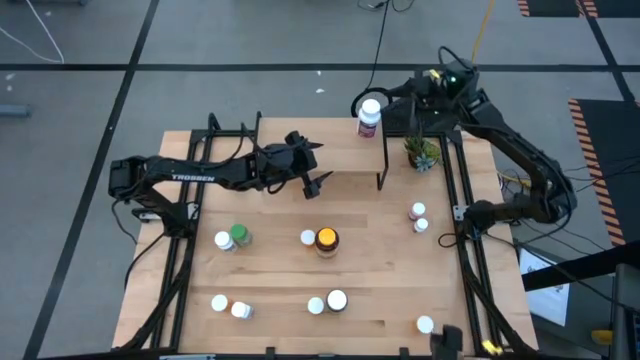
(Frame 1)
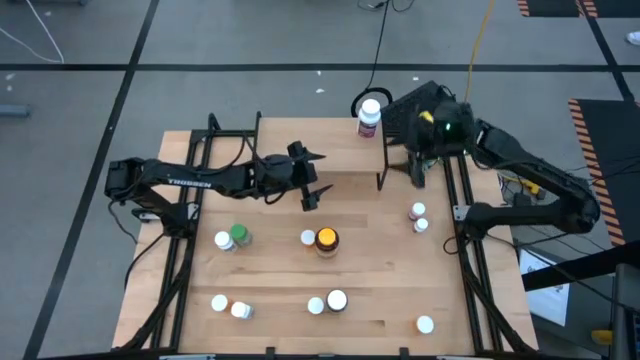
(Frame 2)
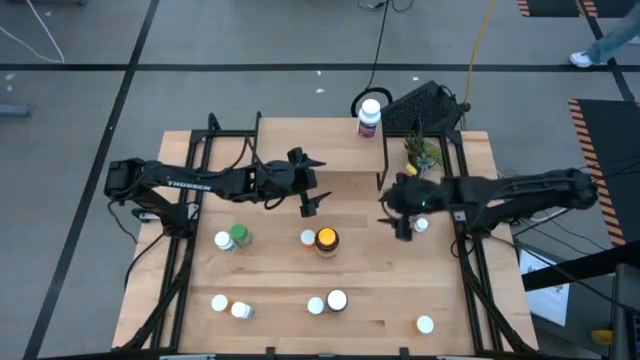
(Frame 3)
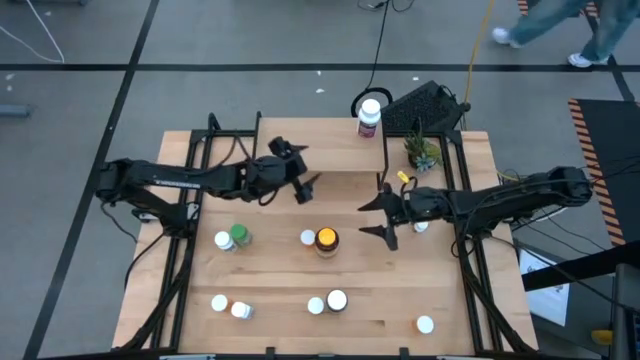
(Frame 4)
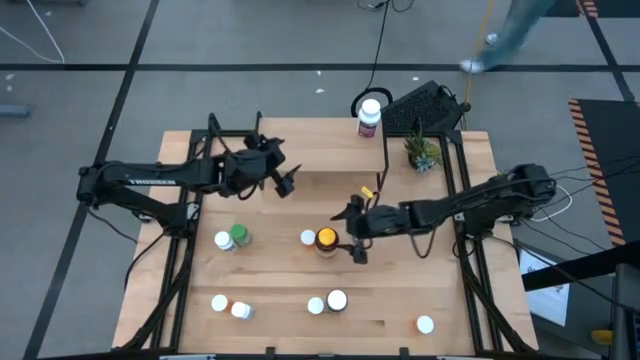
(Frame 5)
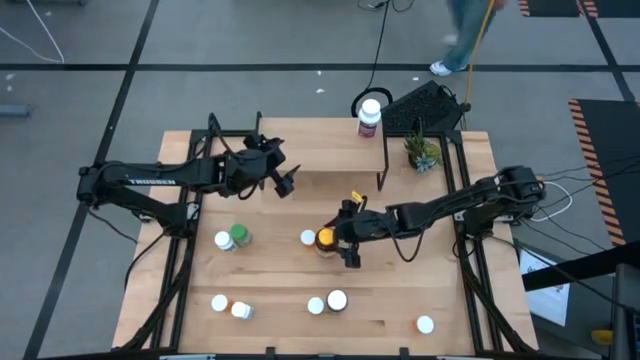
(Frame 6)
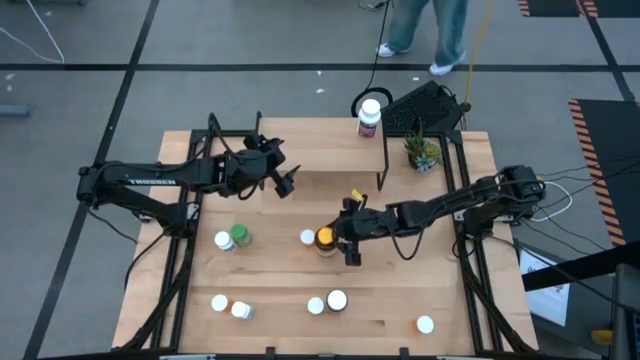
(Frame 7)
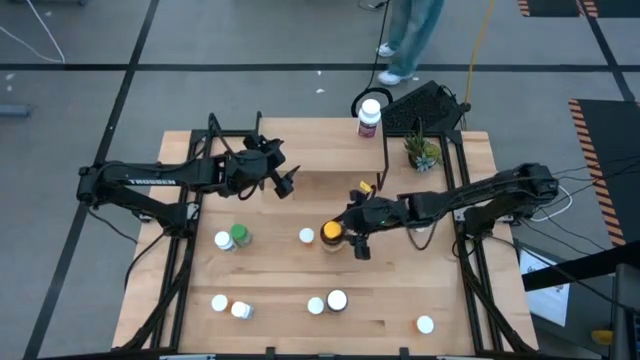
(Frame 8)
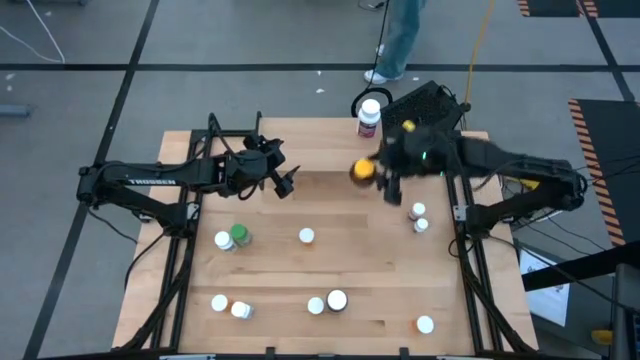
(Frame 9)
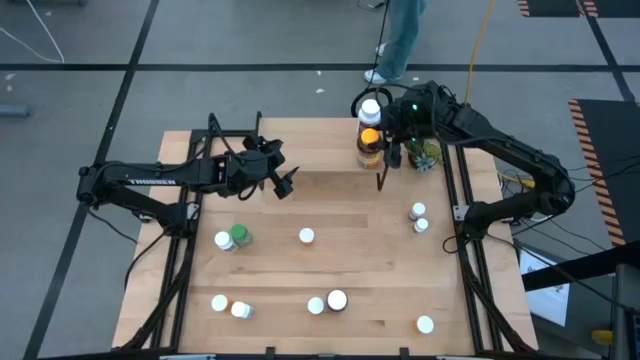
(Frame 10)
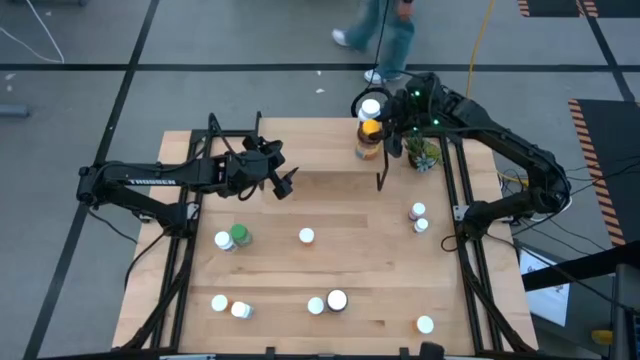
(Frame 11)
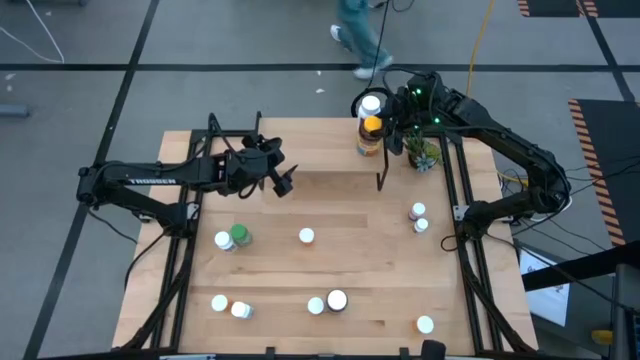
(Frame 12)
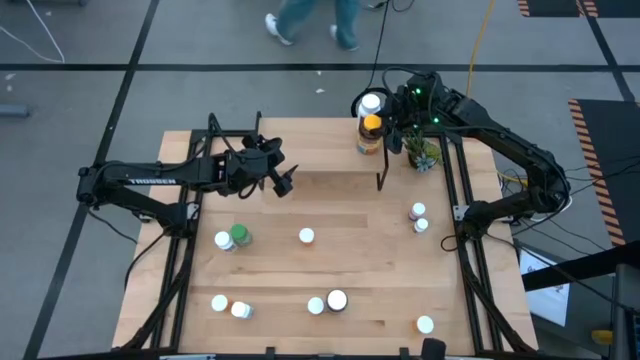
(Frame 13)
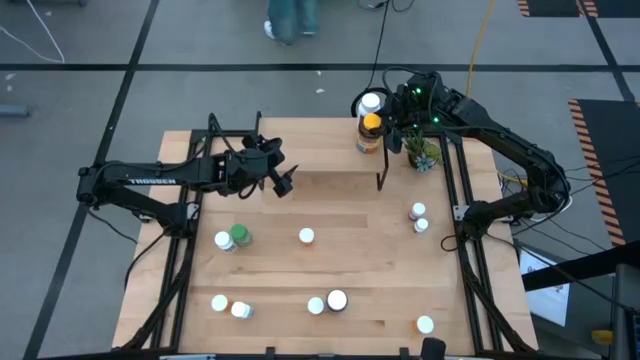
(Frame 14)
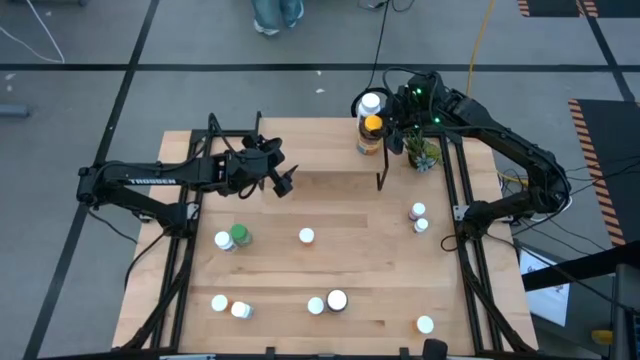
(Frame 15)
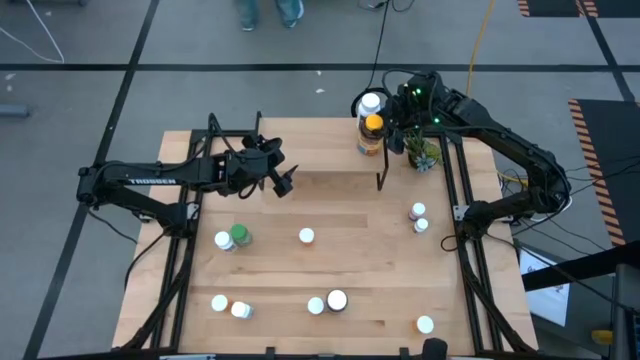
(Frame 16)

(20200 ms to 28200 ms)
Task: Pick and place medicine bottles onto shelf by color
Put the yellow pill bottle on the shelf

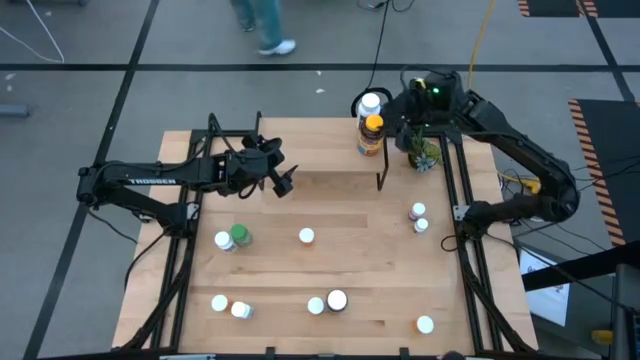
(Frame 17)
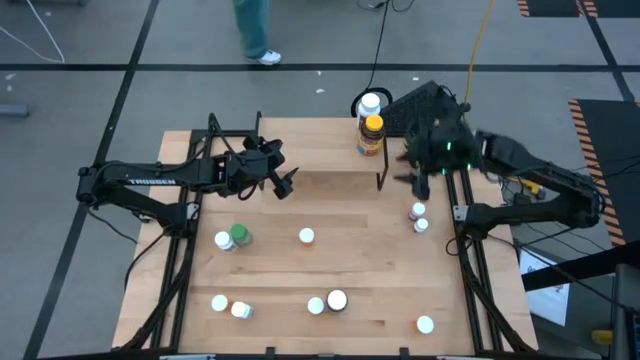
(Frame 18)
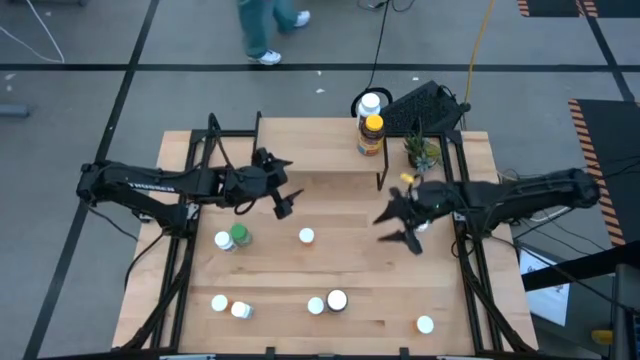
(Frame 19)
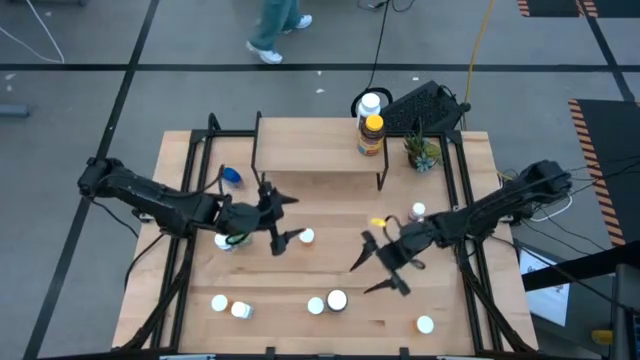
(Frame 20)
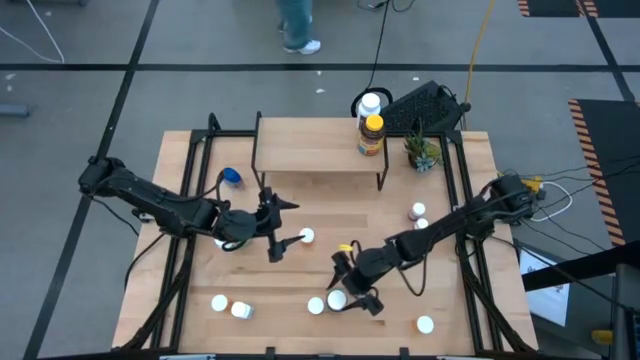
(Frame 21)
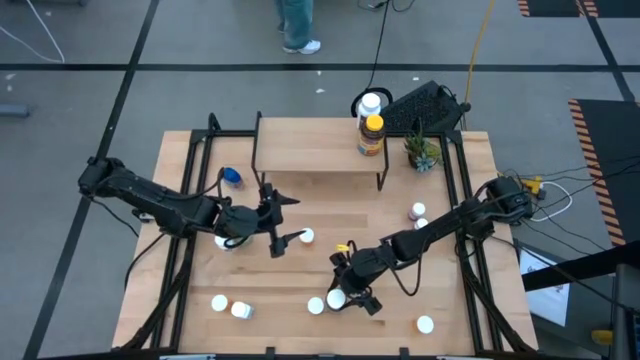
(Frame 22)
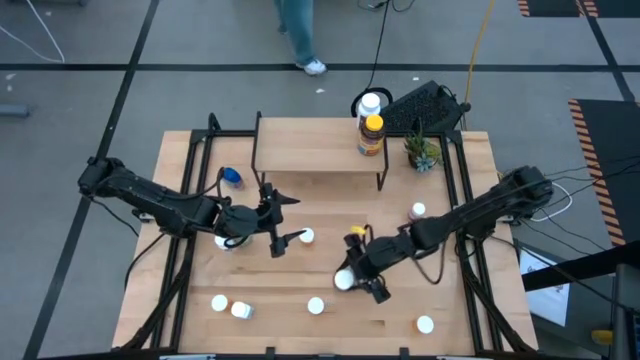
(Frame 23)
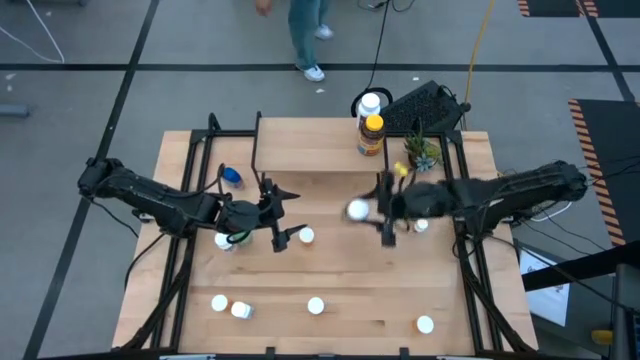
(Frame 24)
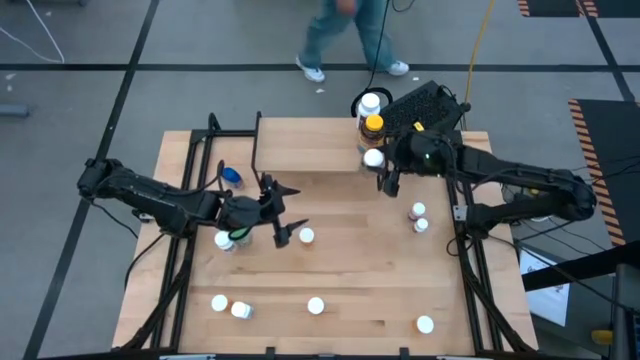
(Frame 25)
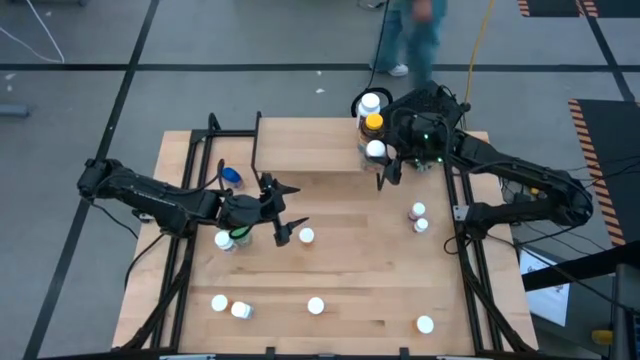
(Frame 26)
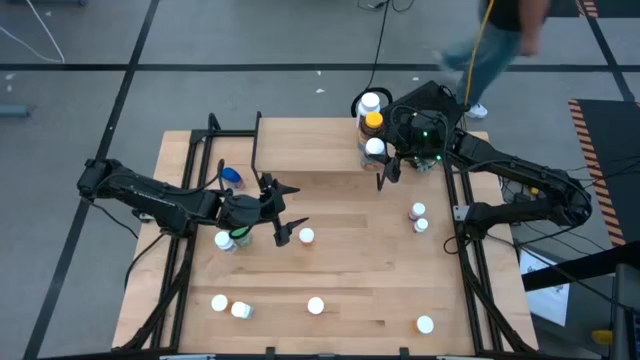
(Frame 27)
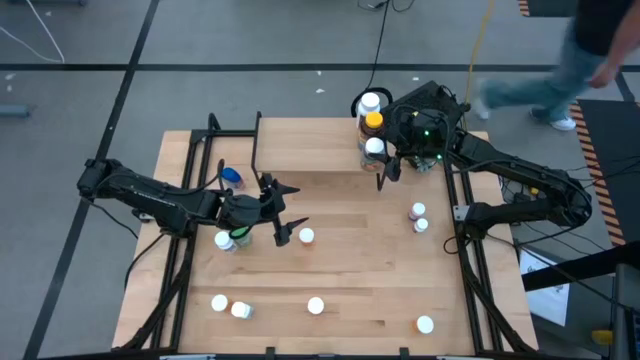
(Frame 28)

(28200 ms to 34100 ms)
Put the green pill bottle on the shelf

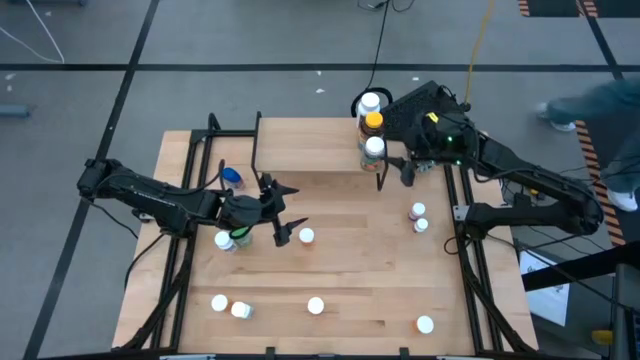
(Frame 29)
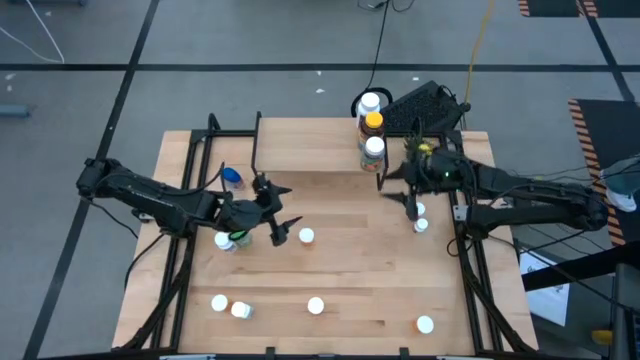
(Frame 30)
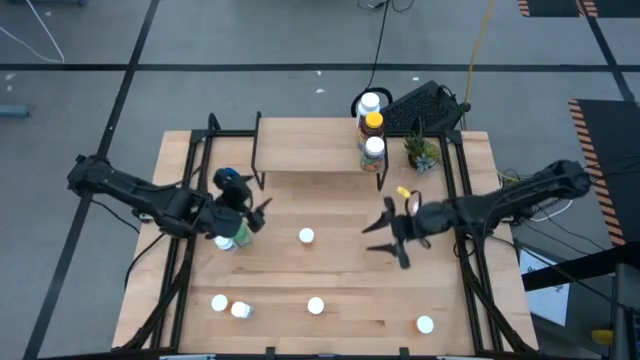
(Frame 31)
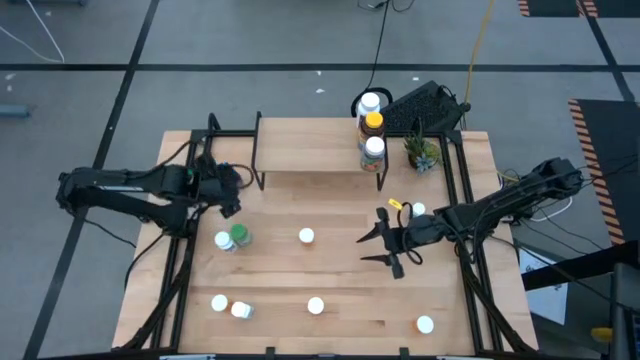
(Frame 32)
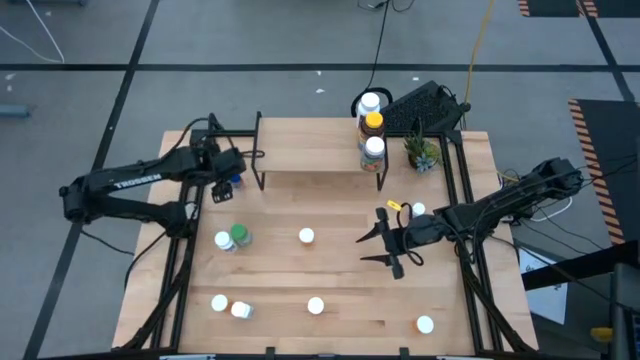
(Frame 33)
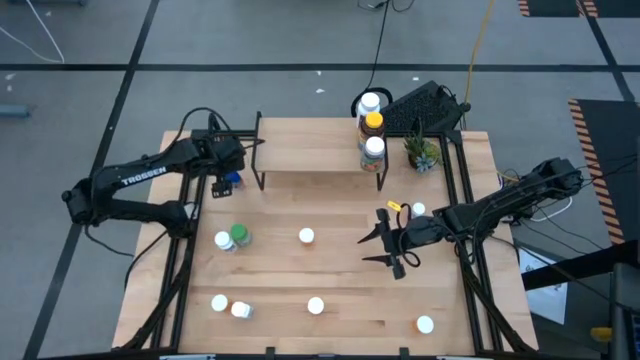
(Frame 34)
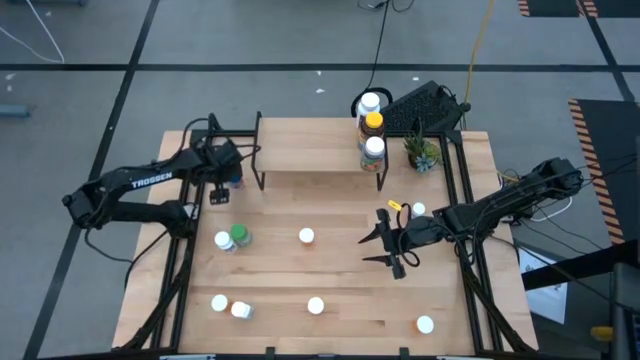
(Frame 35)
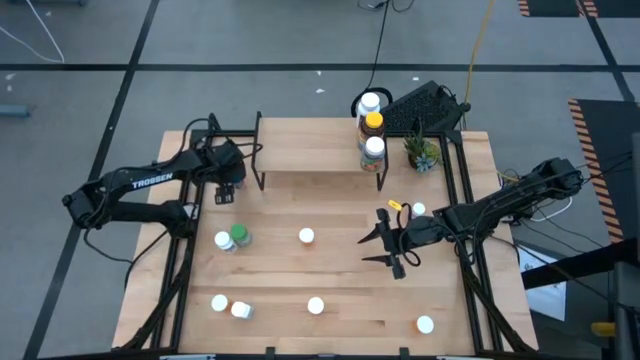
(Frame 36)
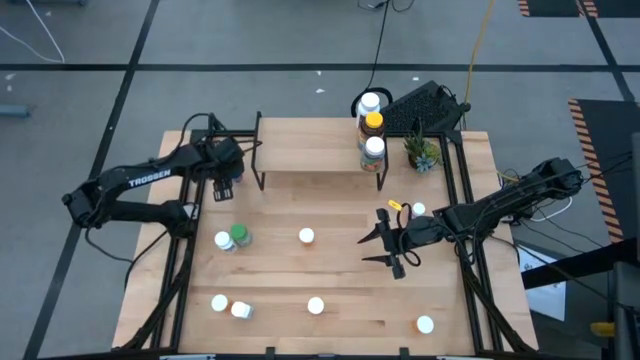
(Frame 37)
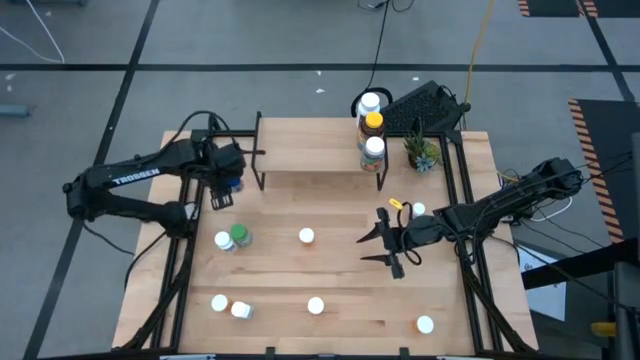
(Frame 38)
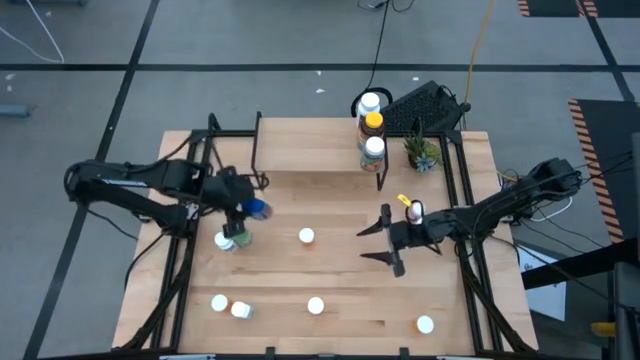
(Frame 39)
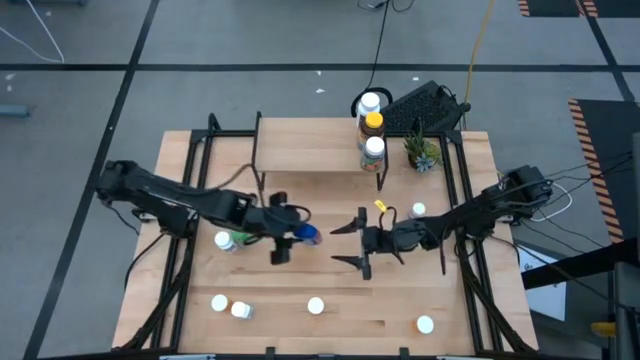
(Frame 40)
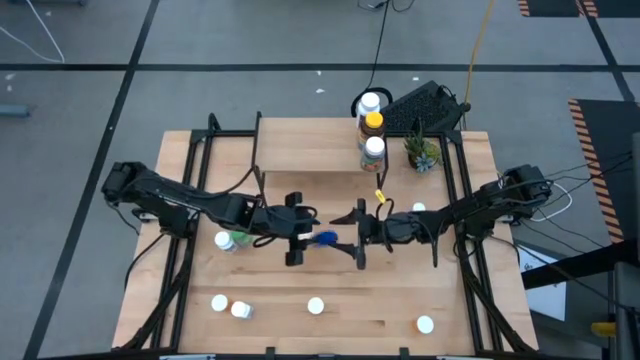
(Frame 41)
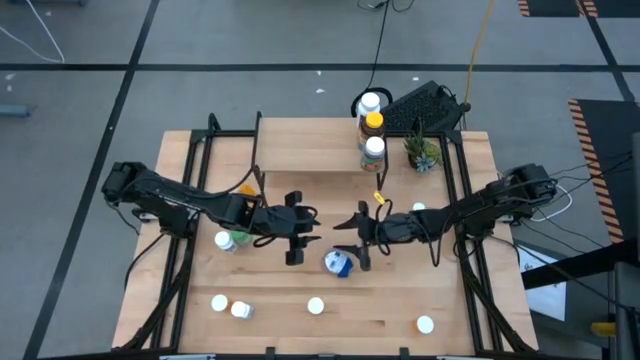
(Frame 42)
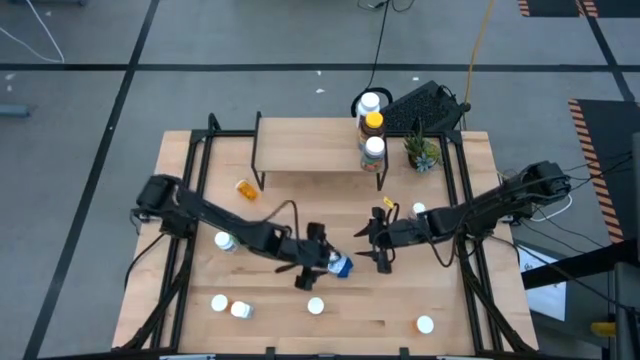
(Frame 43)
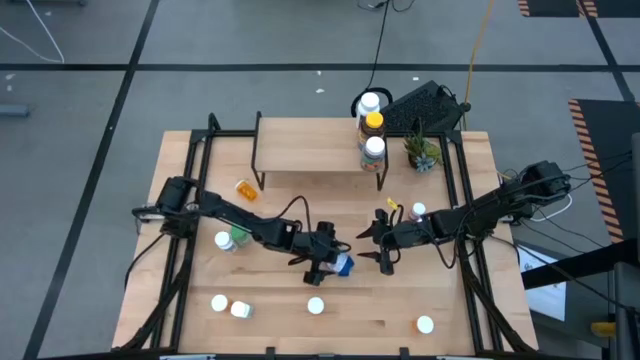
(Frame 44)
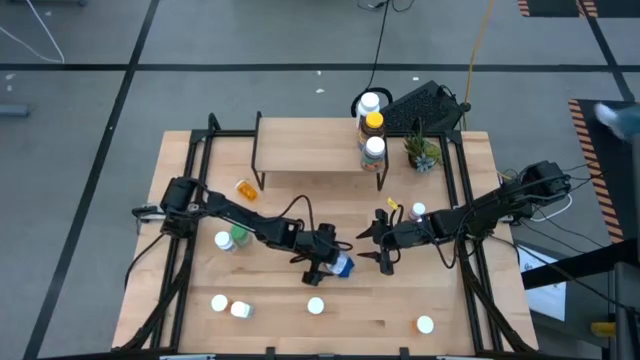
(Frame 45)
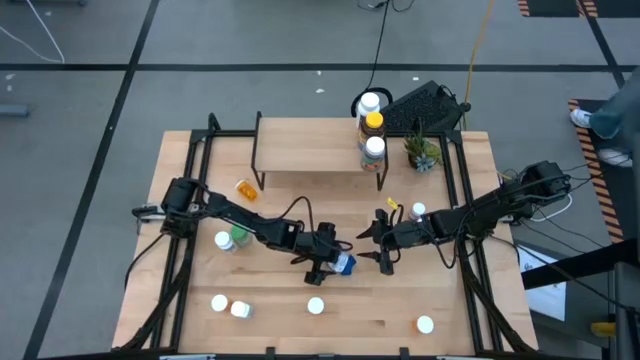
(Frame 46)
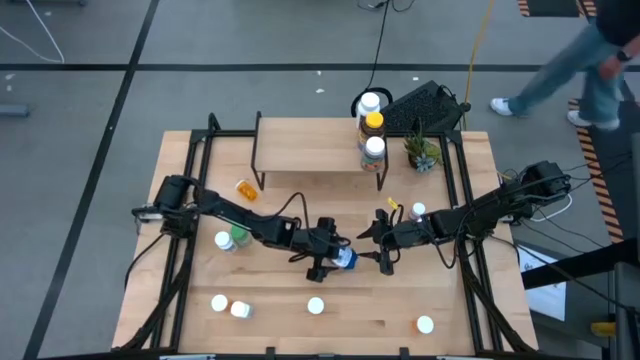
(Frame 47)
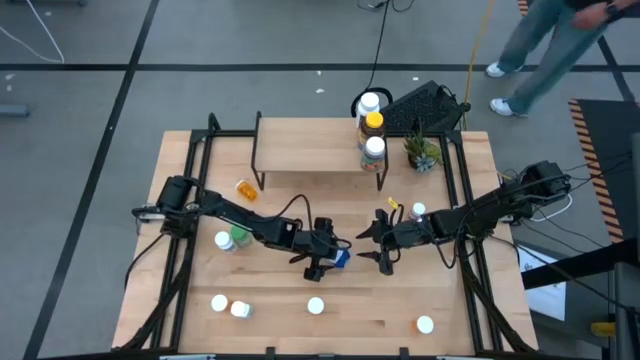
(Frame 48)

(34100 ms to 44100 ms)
Put the blue pill bottle on the shelf
